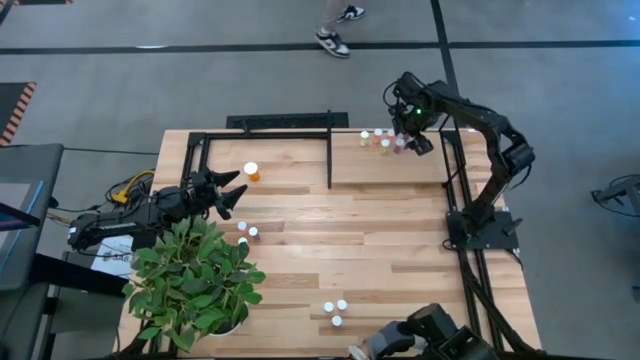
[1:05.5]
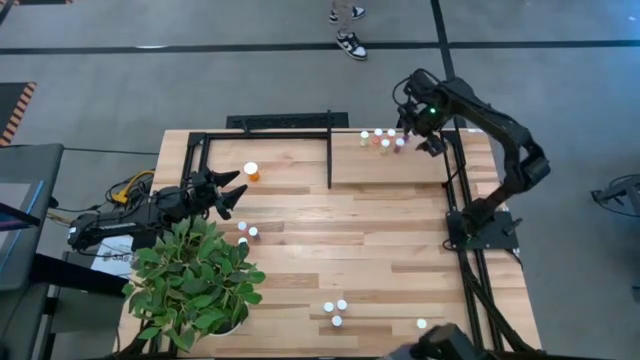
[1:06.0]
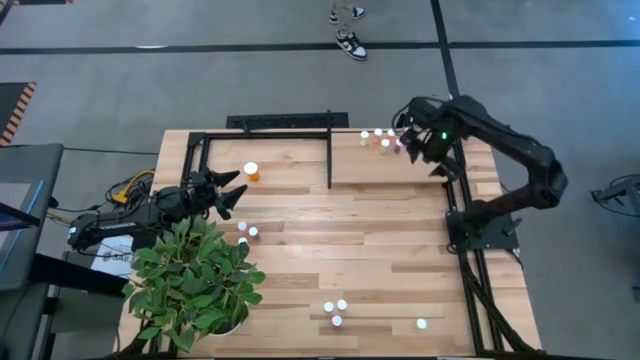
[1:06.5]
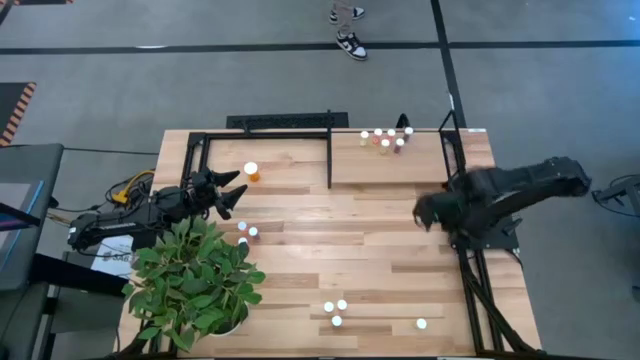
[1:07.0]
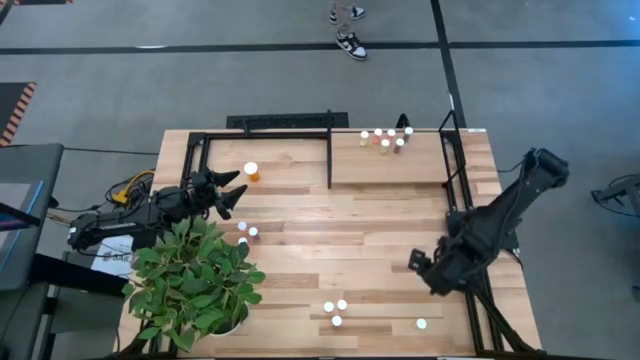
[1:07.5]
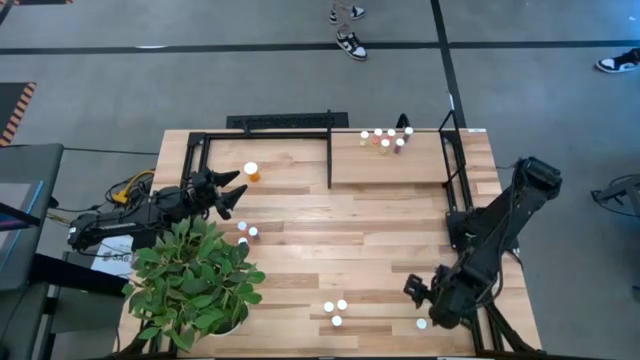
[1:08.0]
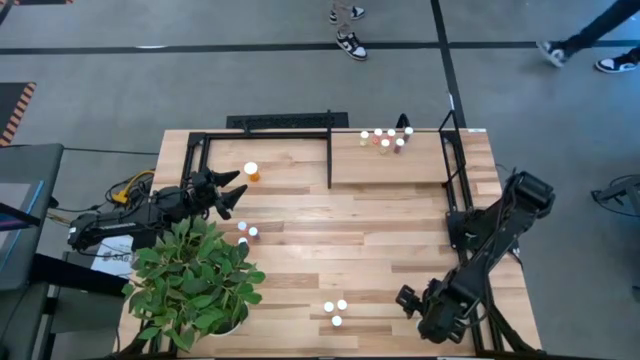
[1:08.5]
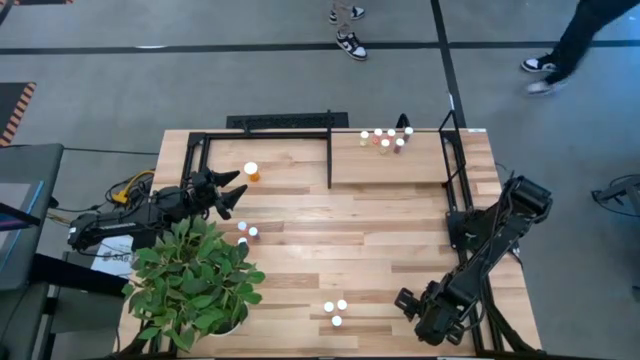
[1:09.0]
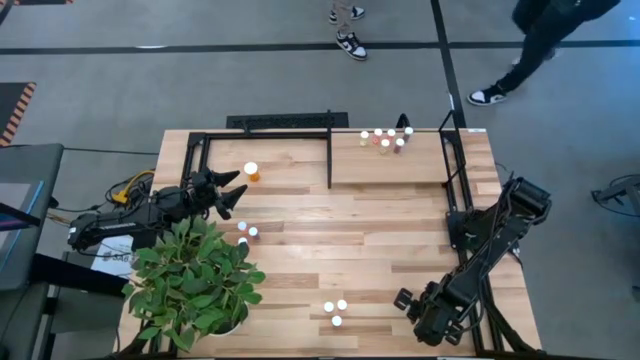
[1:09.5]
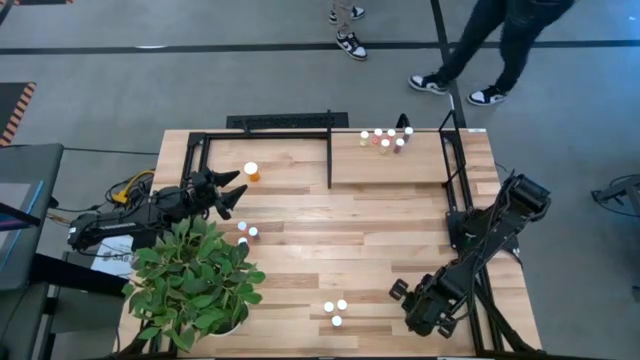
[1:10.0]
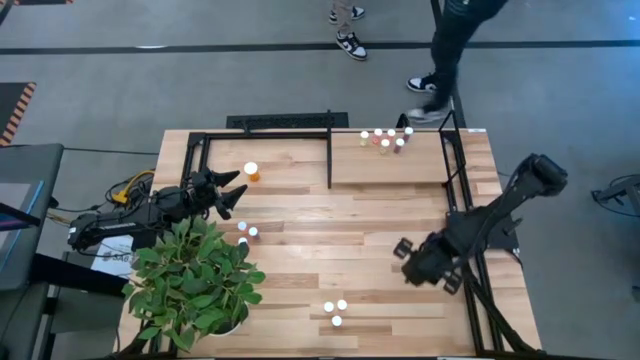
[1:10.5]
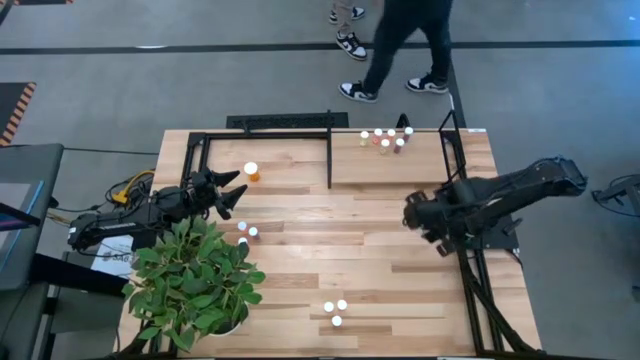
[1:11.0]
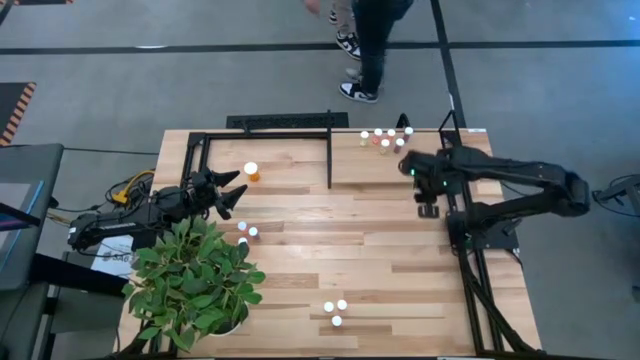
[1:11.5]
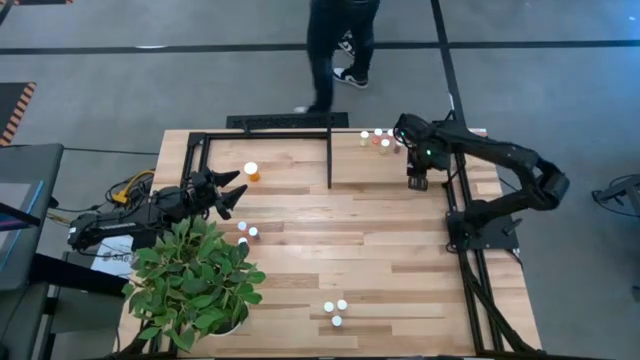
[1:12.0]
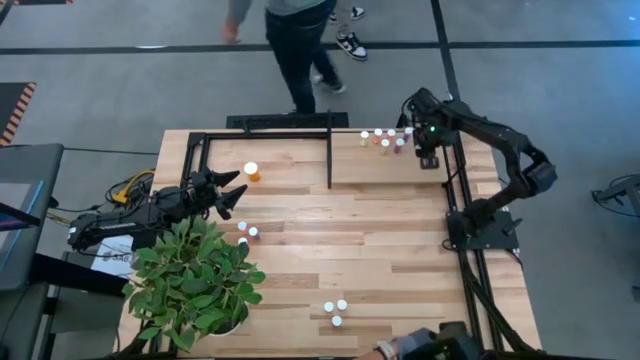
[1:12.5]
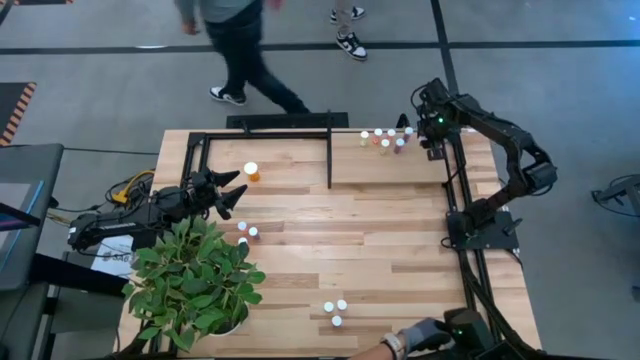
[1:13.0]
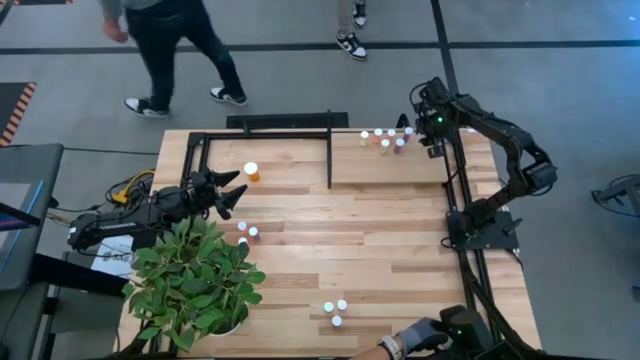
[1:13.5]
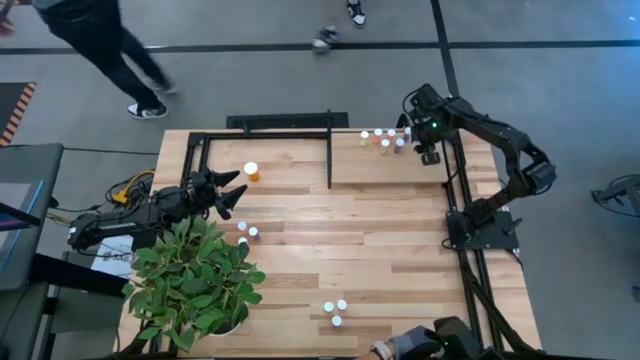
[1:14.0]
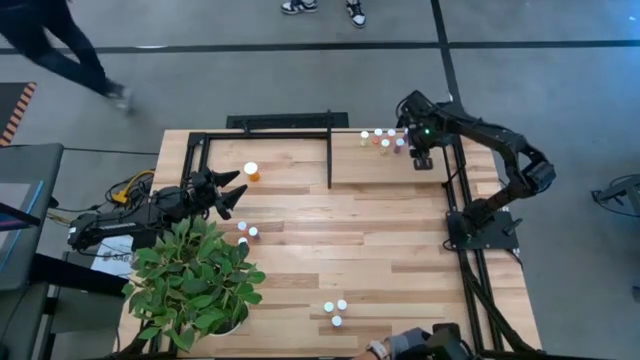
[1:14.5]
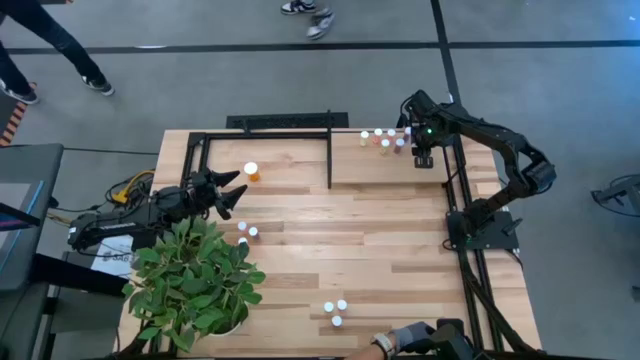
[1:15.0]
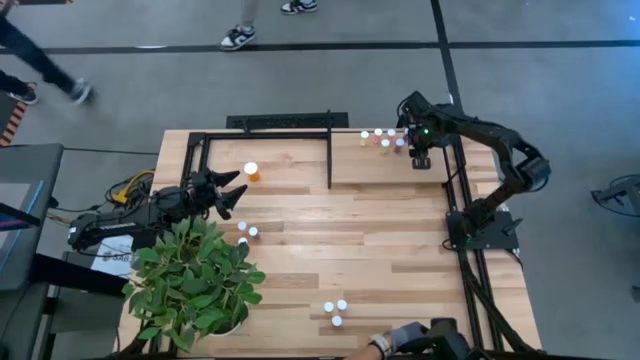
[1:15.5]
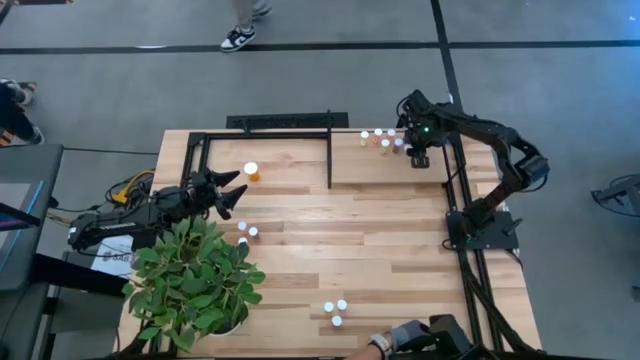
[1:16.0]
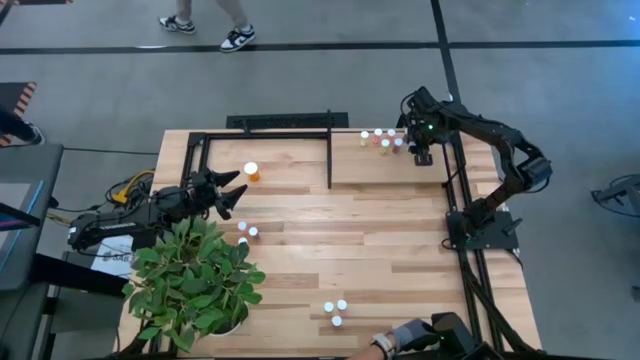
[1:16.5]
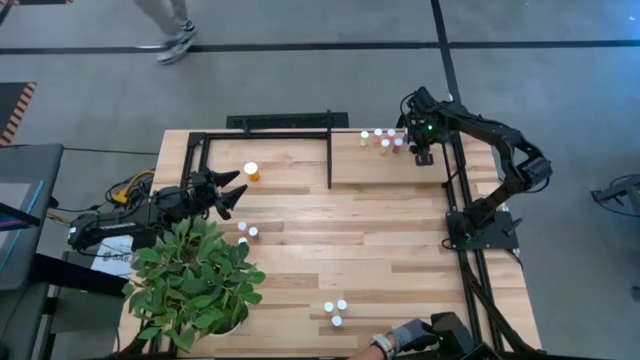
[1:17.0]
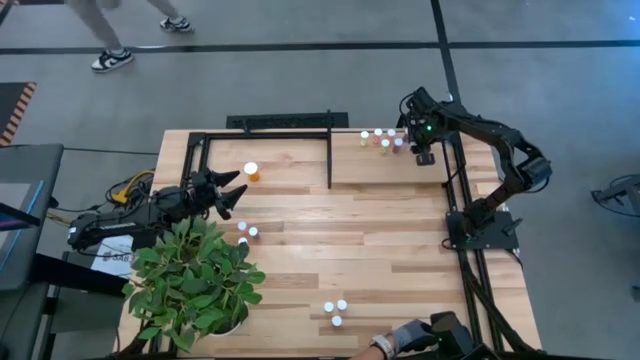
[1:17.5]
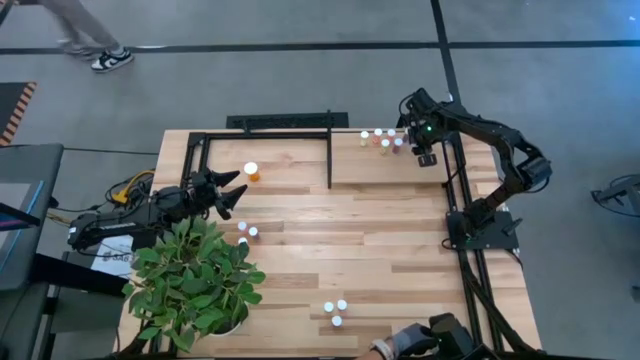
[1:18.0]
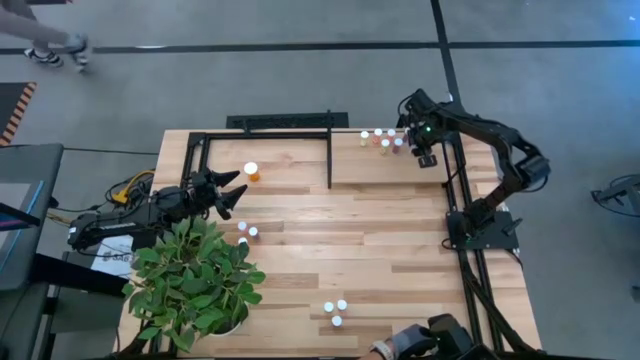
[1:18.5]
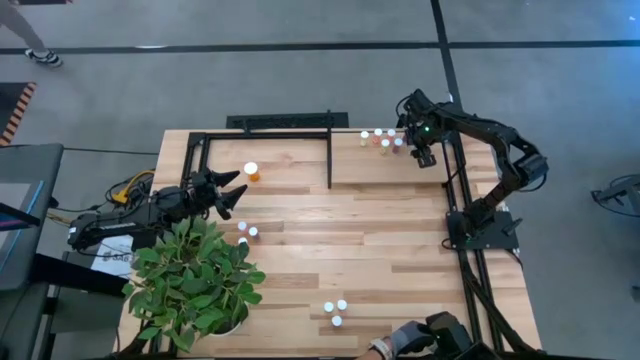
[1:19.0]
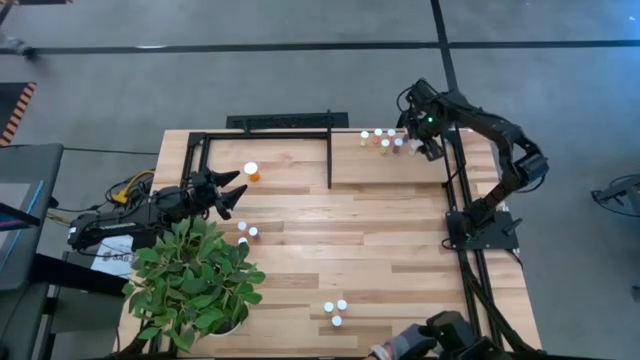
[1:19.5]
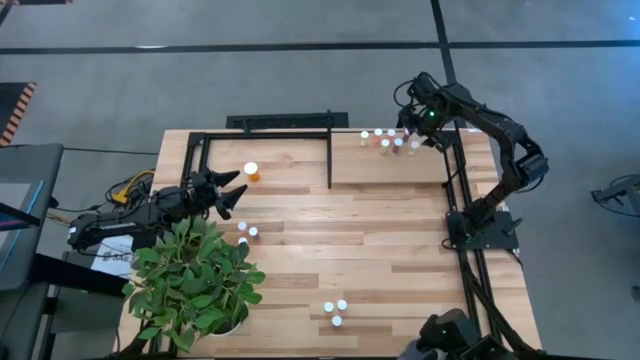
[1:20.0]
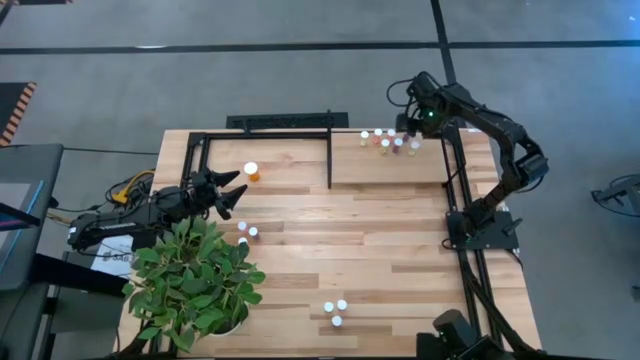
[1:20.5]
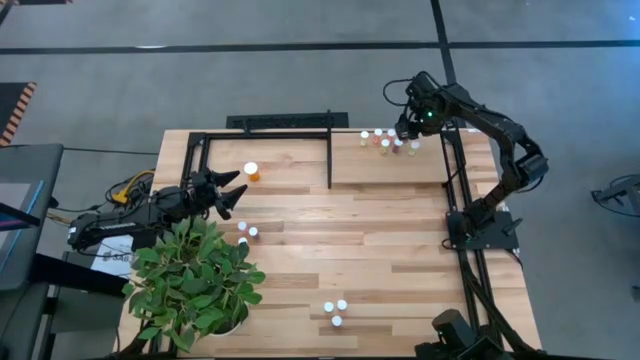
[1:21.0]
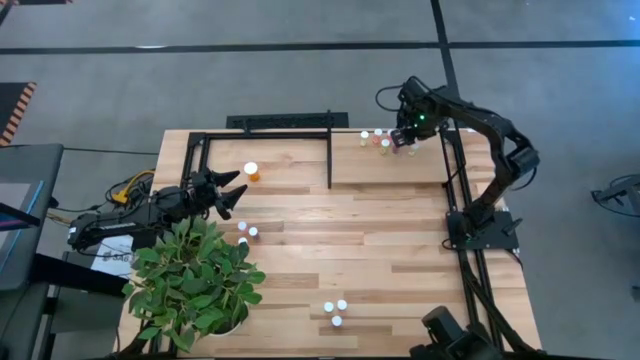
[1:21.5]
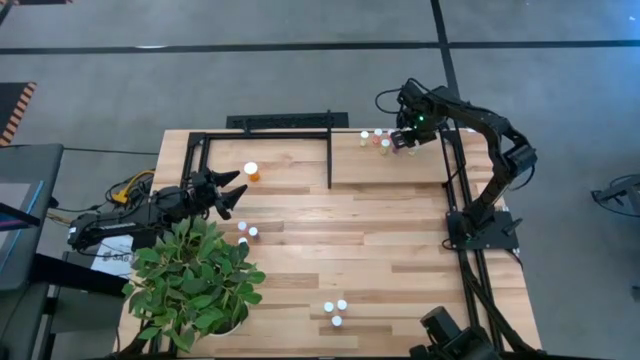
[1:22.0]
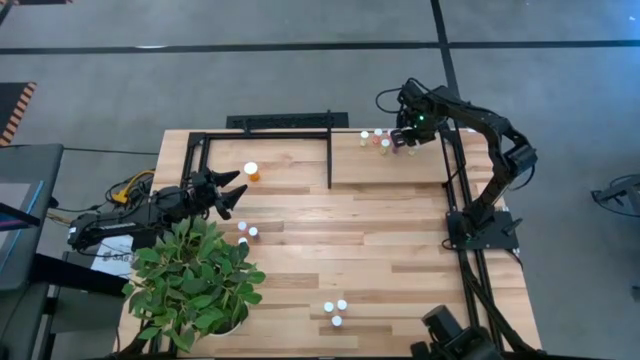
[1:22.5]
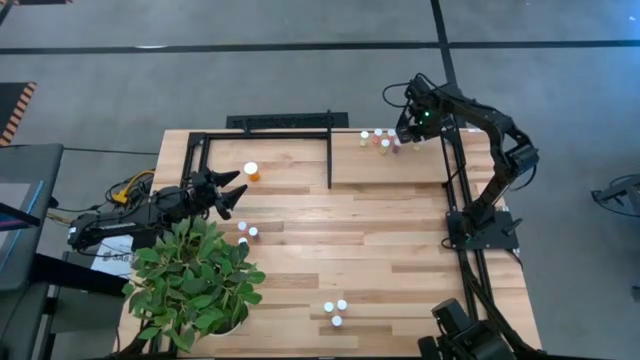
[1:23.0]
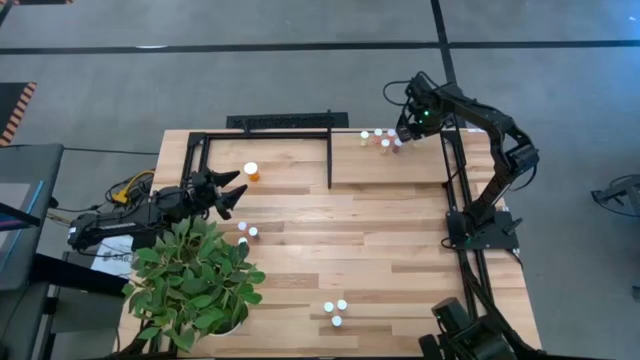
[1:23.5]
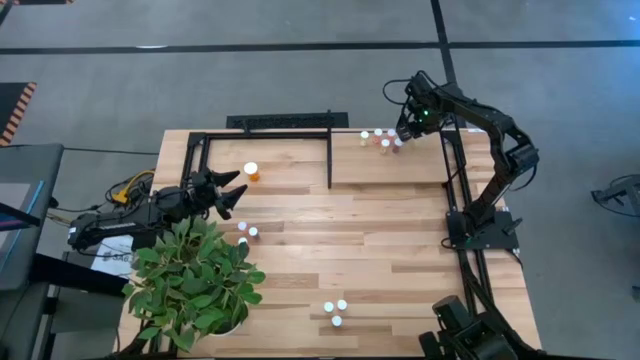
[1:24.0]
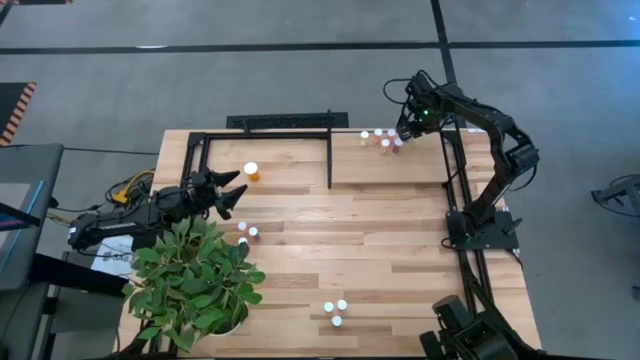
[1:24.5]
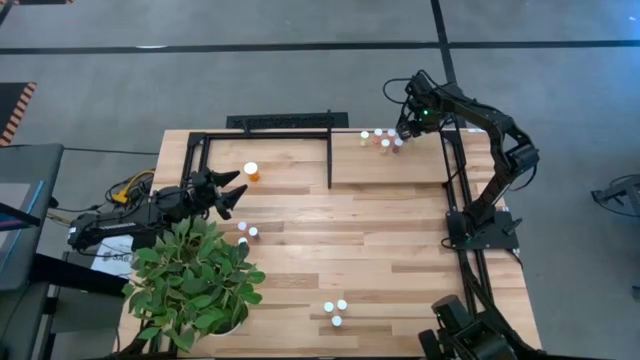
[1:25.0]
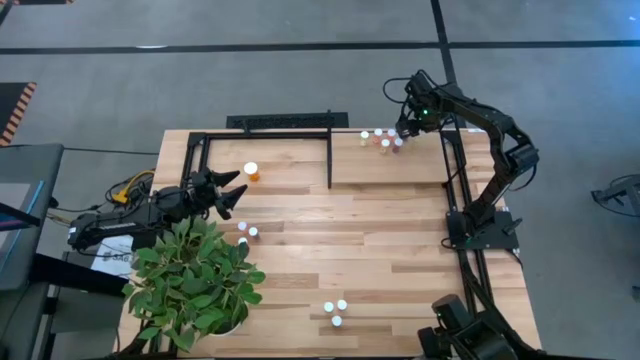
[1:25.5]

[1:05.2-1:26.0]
Task: Pick and place medicine bottles onto shelf by color
Put the yellow pill bottle on the shelf

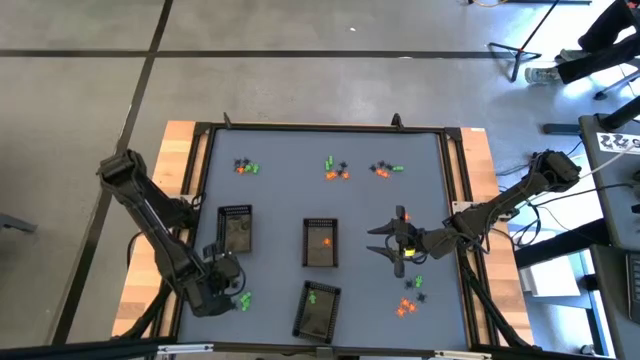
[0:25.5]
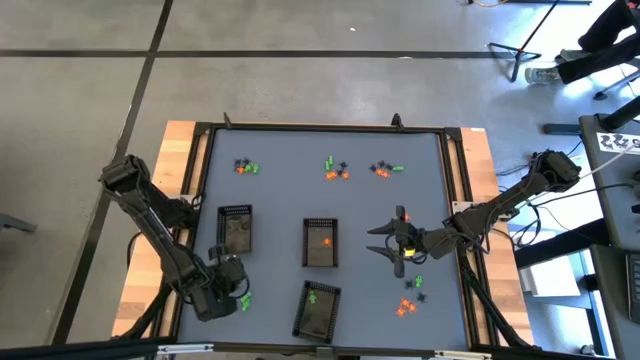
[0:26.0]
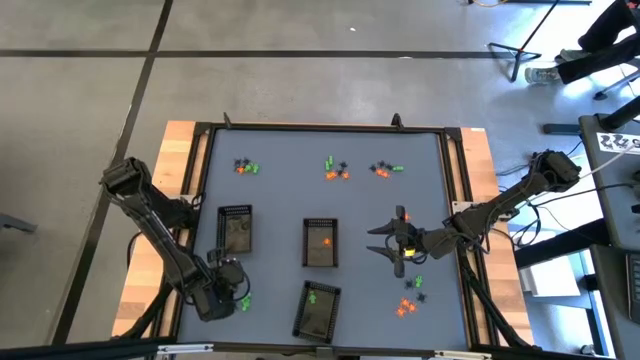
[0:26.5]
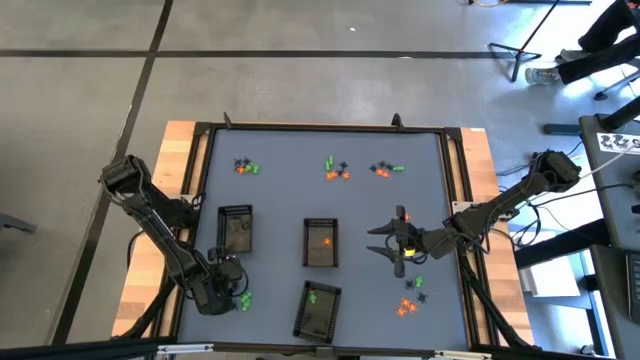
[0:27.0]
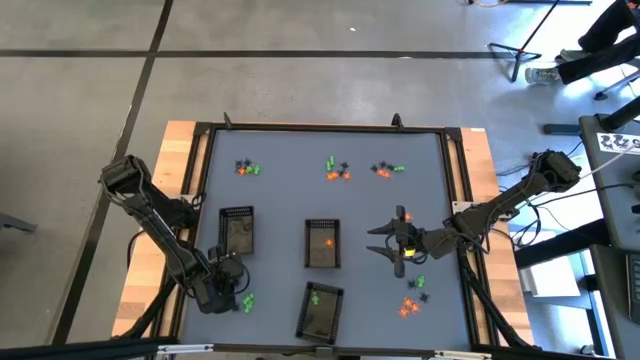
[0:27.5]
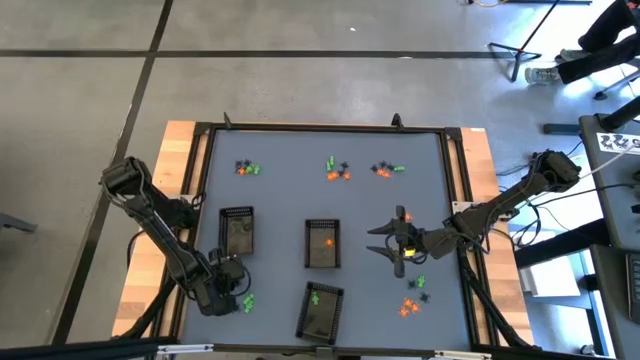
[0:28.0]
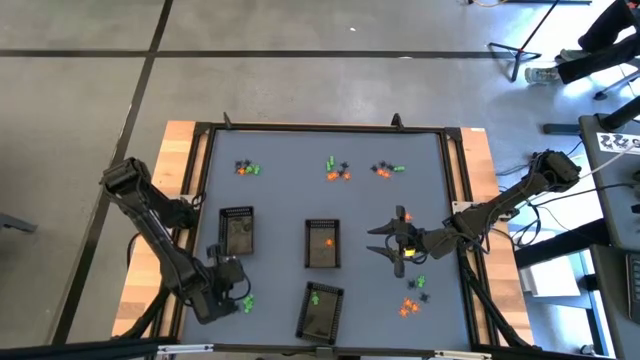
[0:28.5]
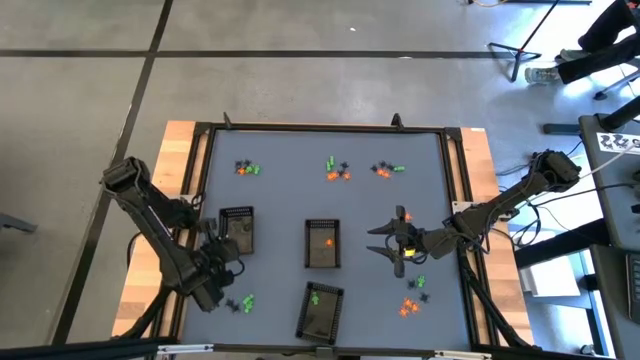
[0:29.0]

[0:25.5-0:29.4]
Task: Sort Halloween decoration
Put the black spider toy into the top left black basket
